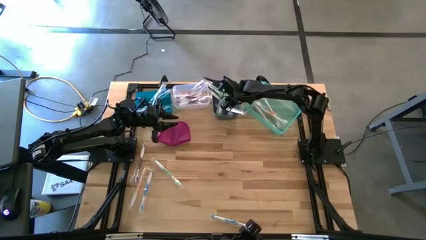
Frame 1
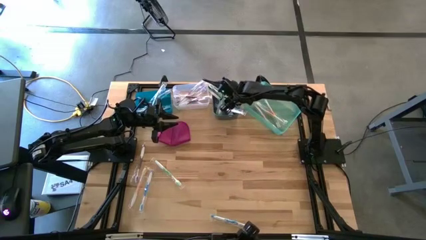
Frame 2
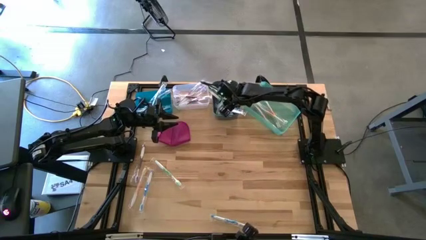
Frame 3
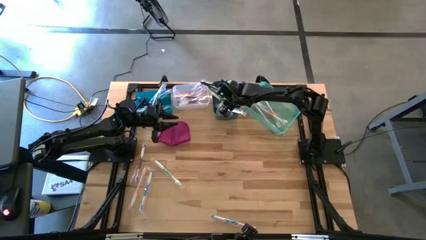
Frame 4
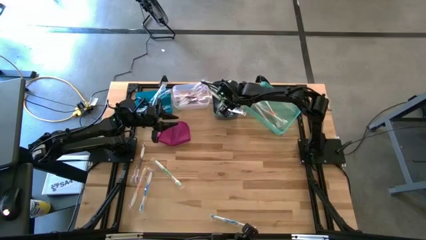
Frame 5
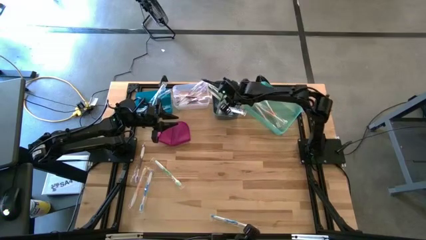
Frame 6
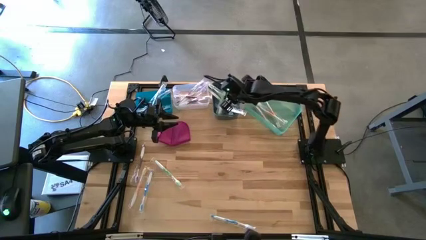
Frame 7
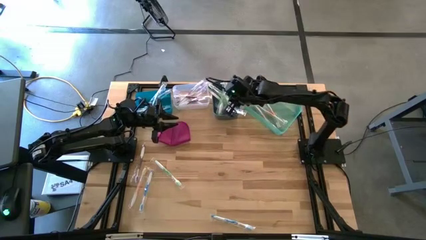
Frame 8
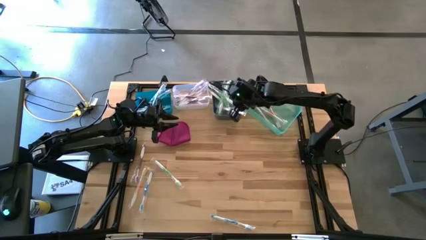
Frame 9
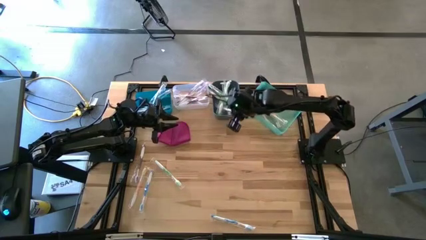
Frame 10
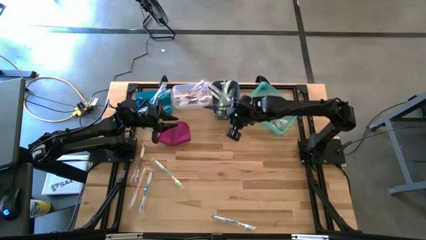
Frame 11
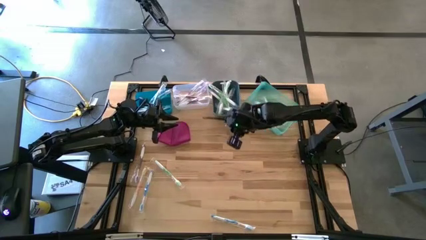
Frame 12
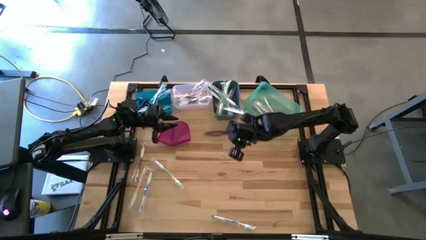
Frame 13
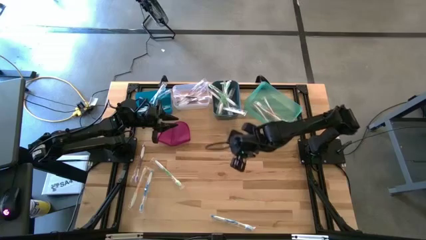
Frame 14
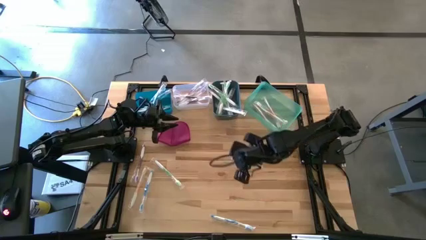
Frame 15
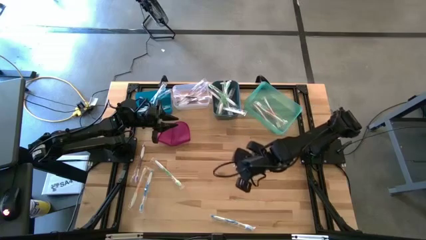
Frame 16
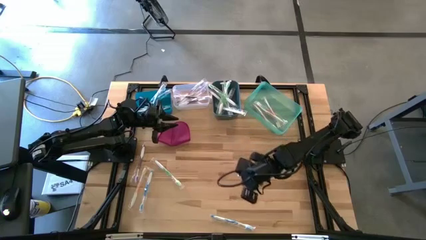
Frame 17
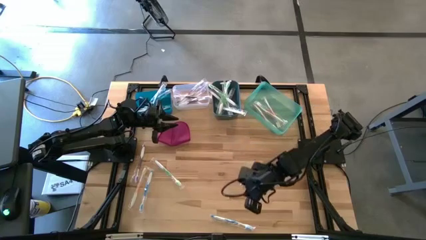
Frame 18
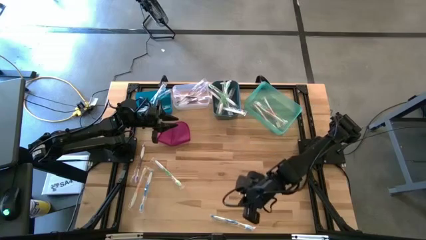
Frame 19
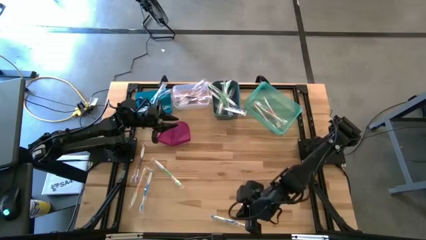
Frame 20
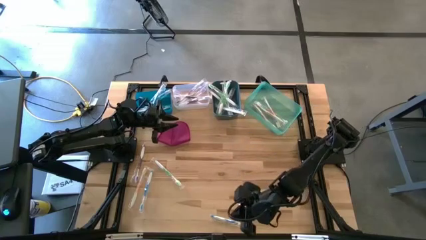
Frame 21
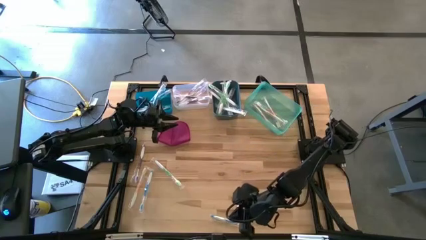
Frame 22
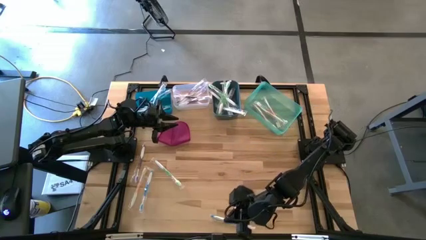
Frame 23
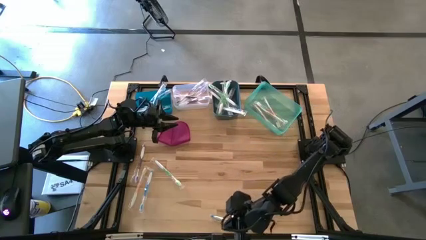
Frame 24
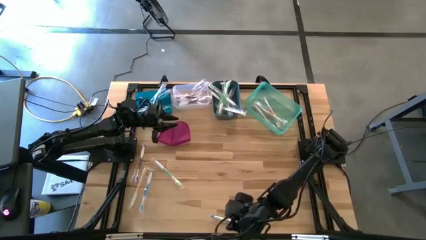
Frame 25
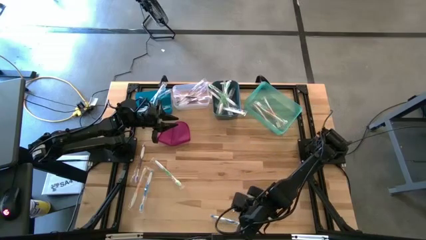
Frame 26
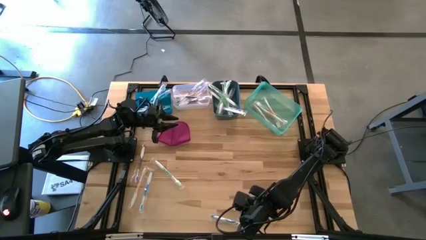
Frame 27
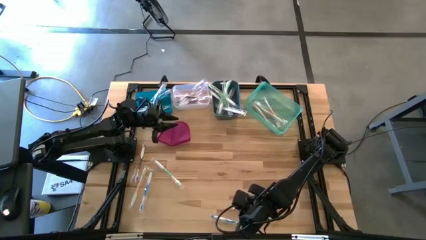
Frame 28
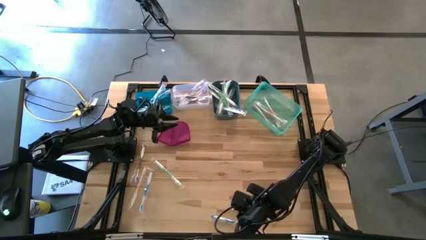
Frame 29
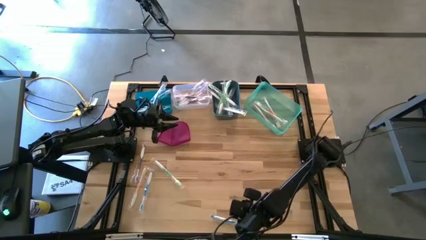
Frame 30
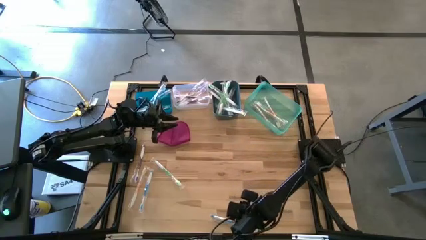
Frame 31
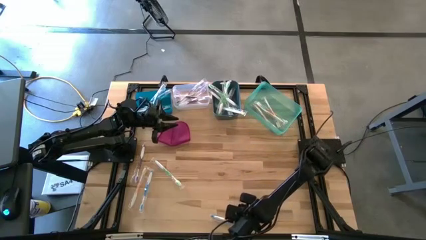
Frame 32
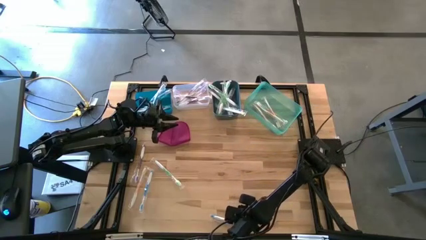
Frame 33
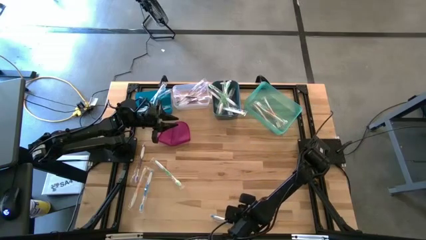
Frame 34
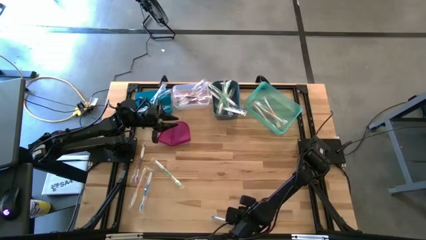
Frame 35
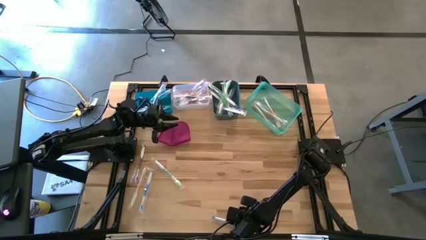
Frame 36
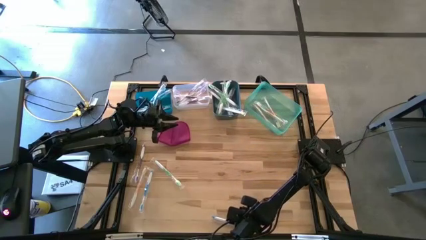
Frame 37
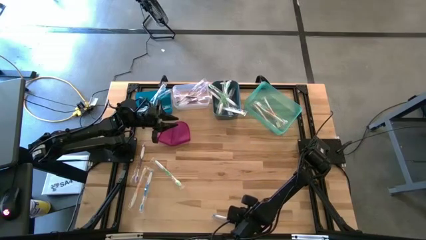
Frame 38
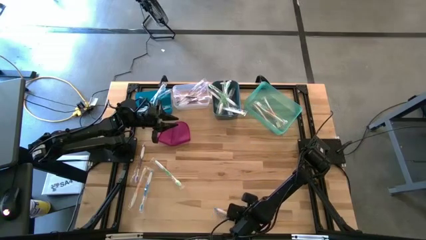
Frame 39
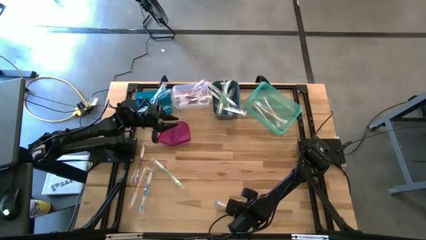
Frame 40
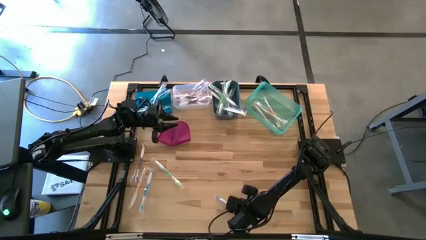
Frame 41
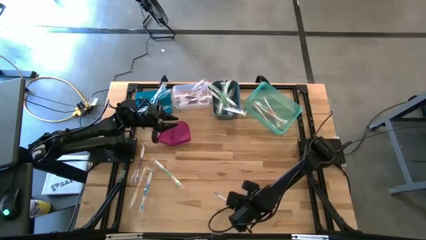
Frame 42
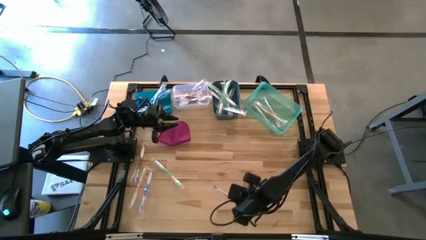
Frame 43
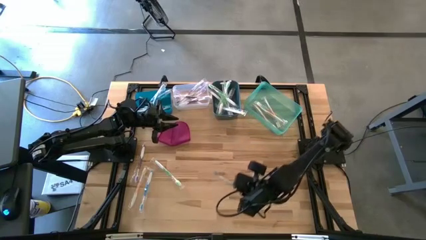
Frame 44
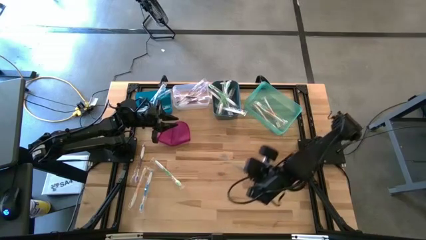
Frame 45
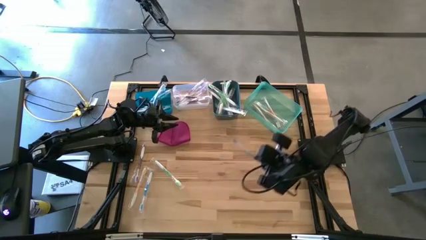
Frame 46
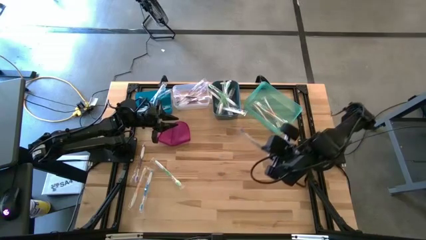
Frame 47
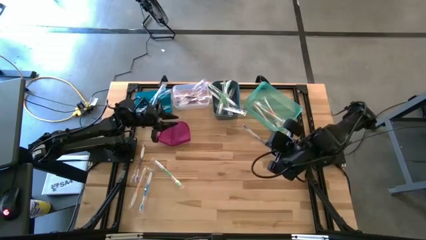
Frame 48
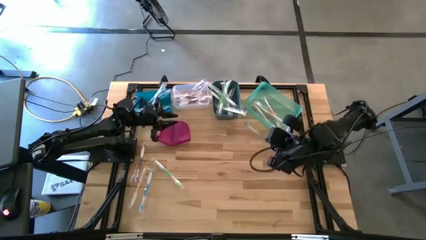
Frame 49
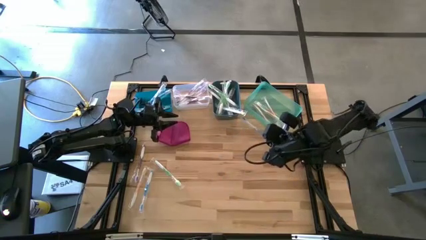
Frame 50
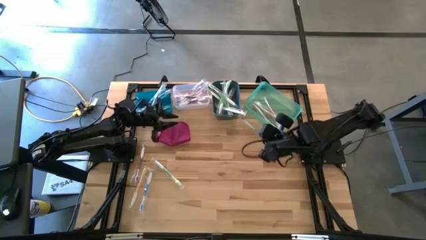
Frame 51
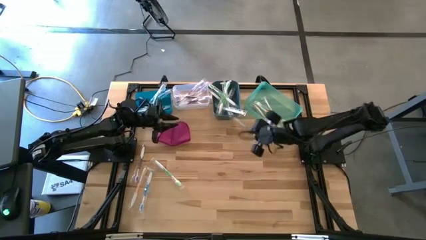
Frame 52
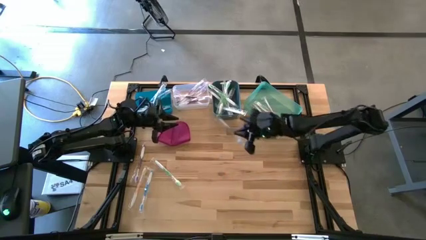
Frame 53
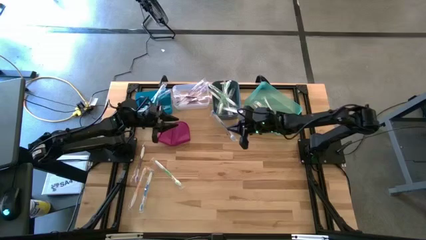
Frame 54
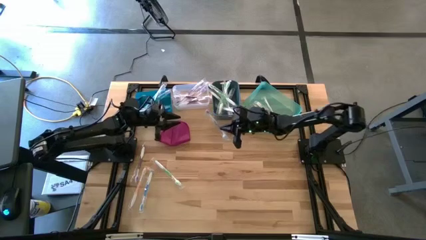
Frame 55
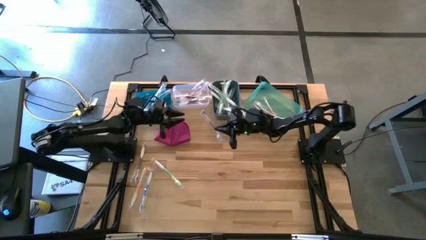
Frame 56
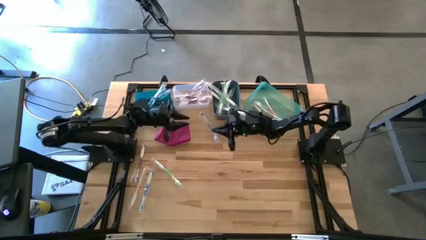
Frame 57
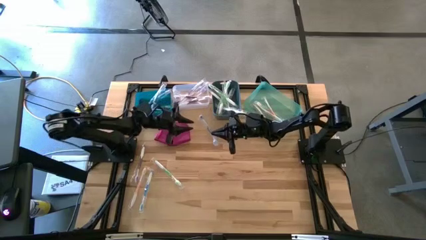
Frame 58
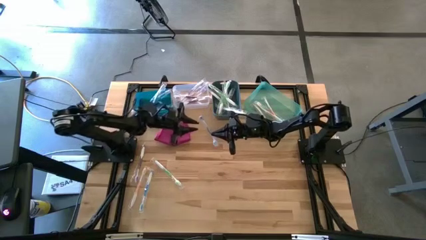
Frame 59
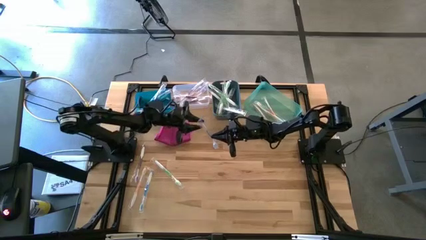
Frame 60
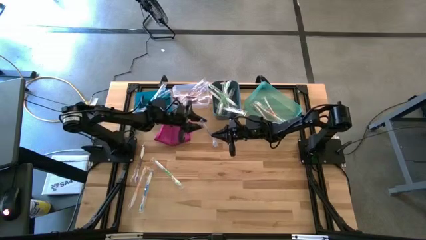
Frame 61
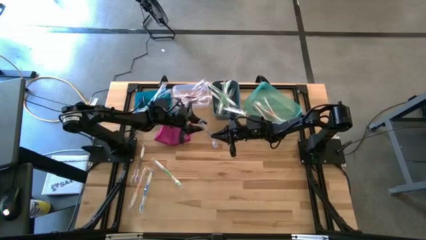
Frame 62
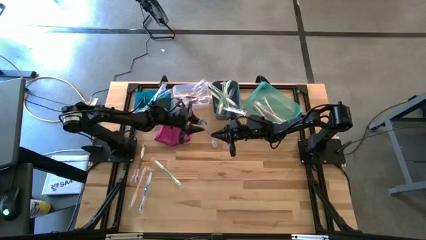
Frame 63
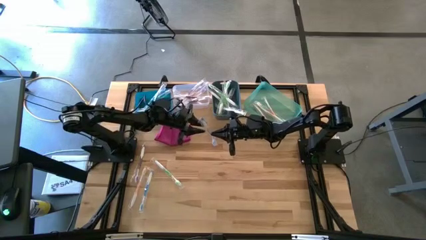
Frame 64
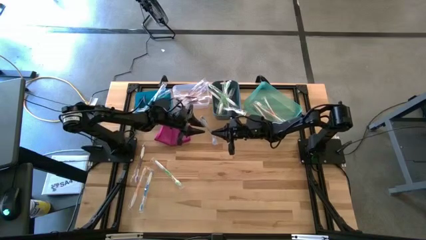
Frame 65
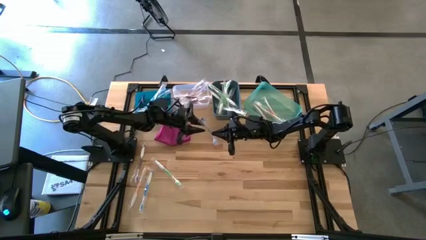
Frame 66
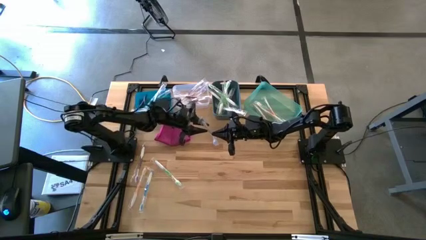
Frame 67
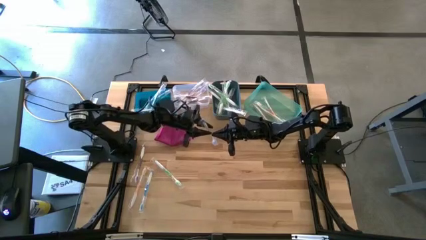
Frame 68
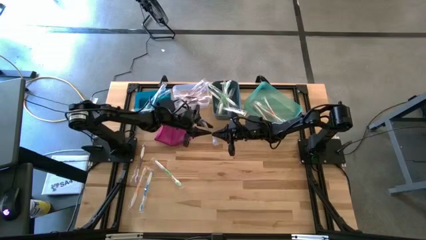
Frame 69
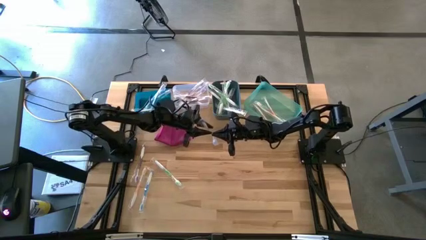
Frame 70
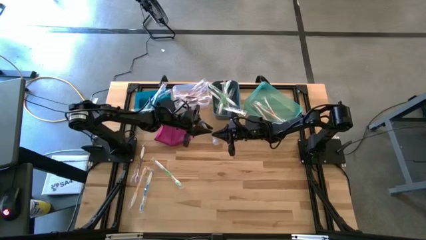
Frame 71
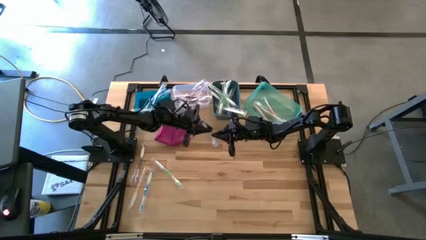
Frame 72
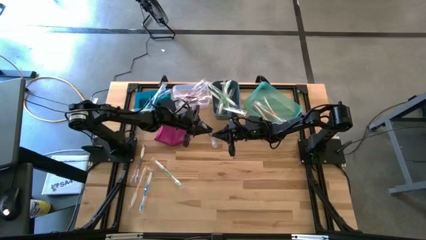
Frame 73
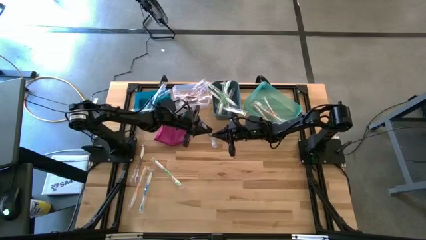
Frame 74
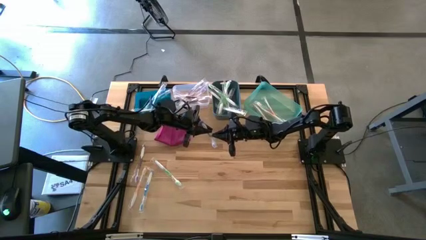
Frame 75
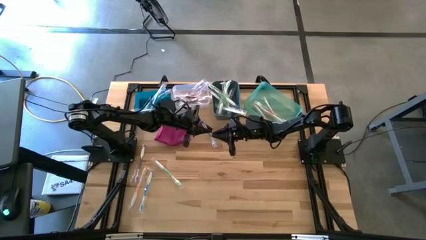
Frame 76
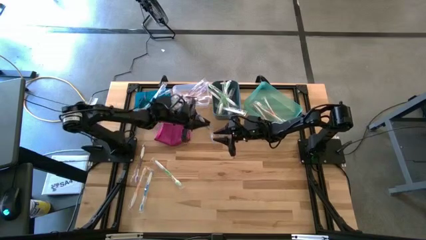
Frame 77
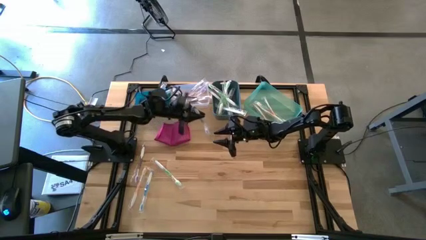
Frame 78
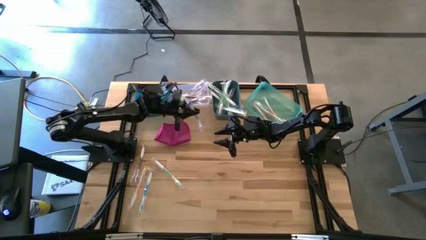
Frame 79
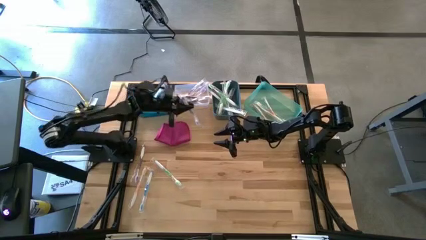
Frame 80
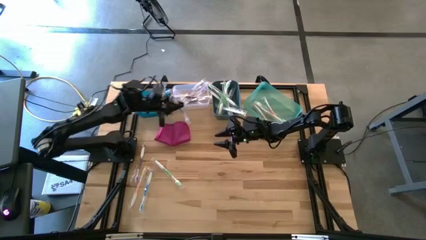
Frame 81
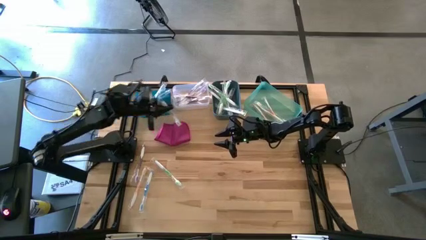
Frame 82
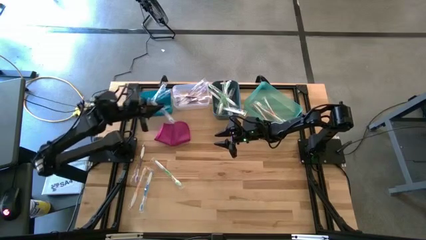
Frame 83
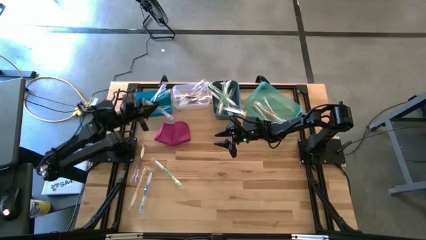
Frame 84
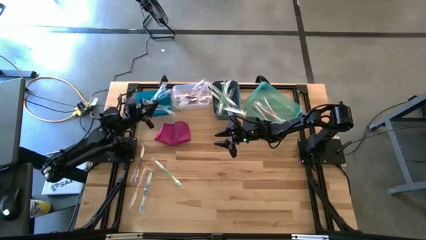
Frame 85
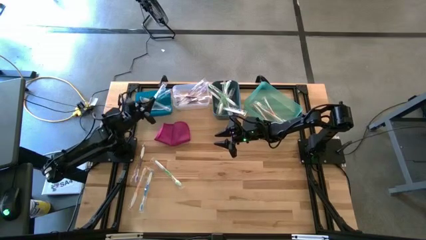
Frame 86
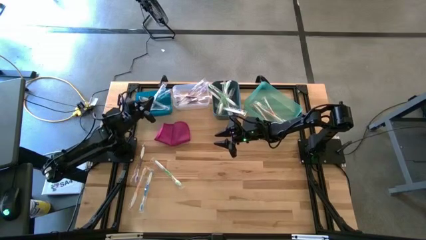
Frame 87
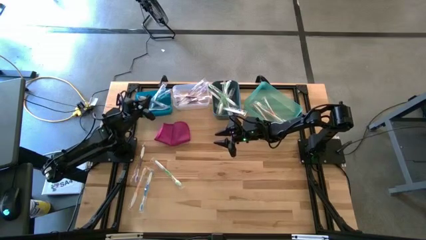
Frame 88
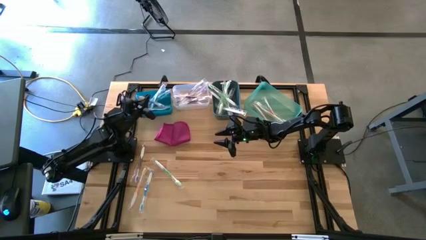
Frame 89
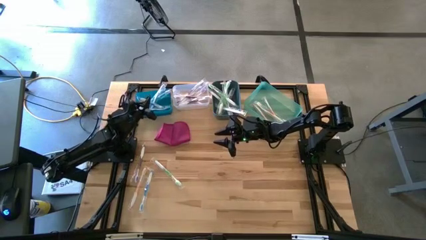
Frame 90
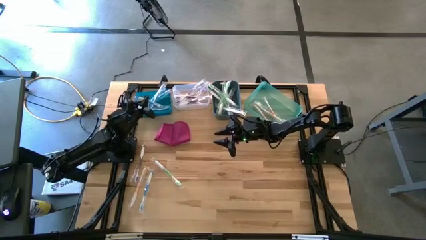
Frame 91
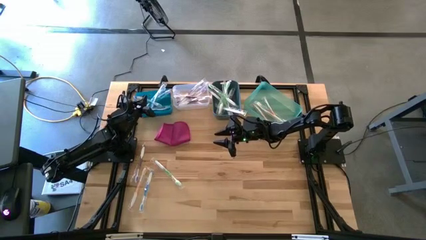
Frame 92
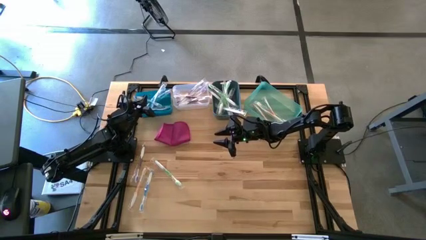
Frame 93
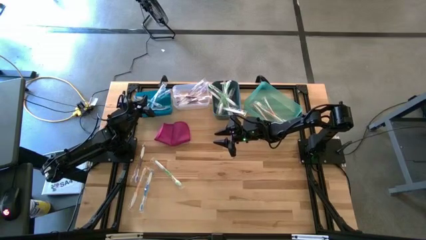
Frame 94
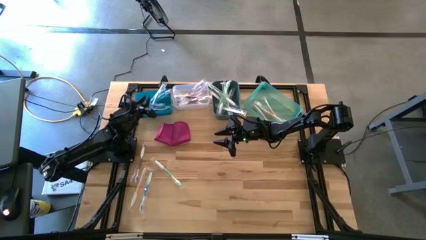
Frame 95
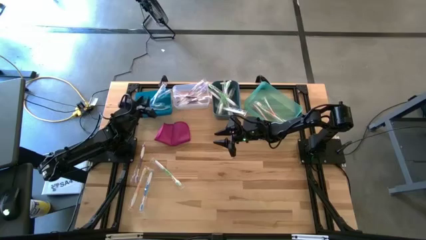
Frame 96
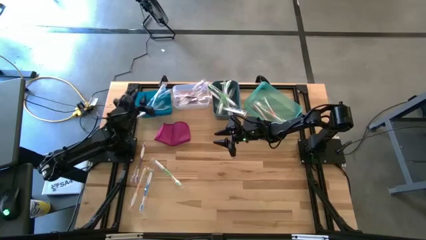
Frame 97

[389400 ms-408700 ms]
Task: Pick & Place Toothbrushes
Put the blue toothbrush into the blue bin
